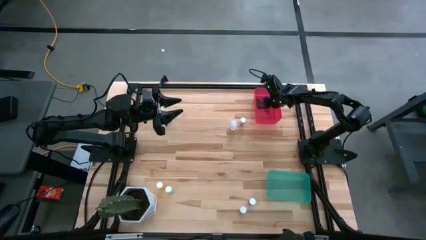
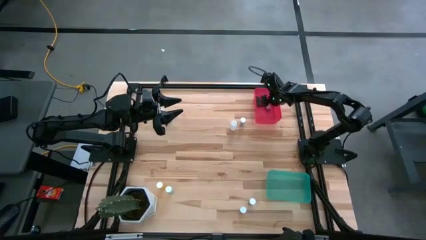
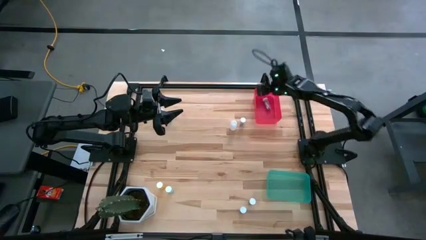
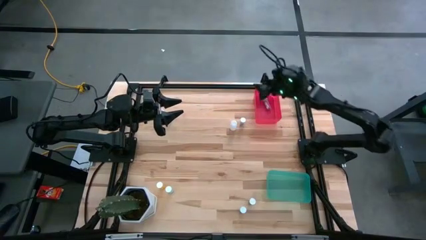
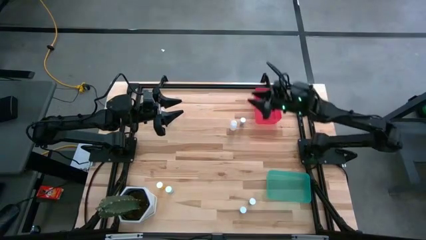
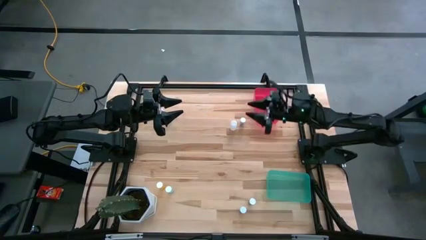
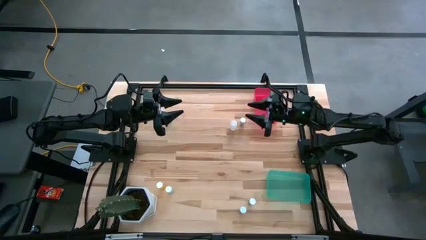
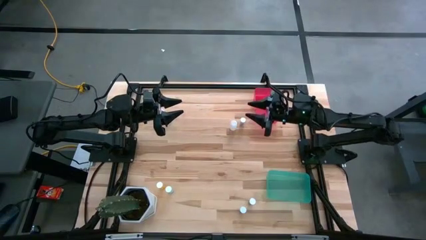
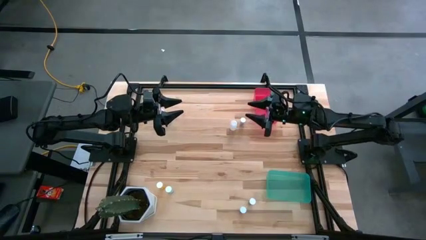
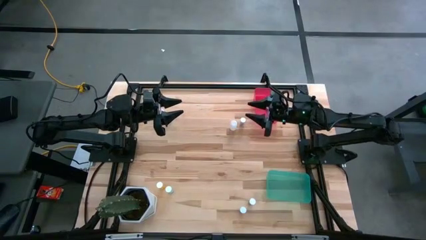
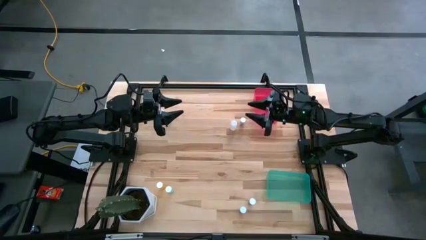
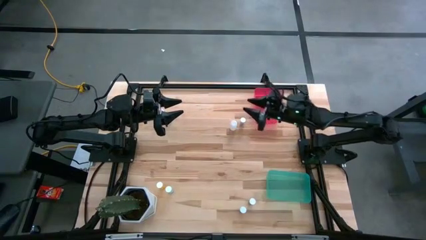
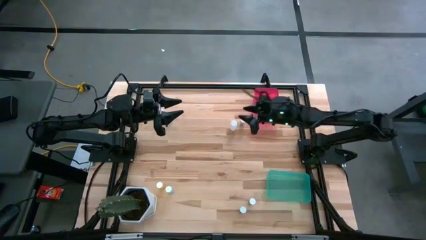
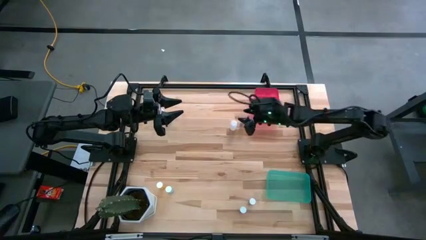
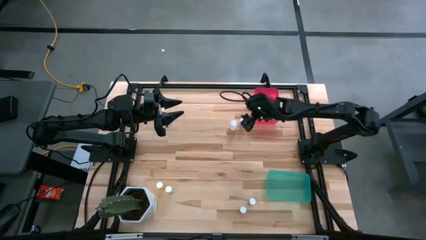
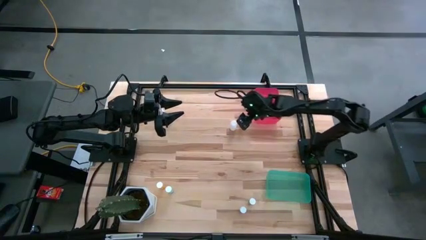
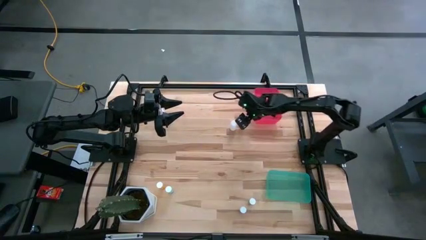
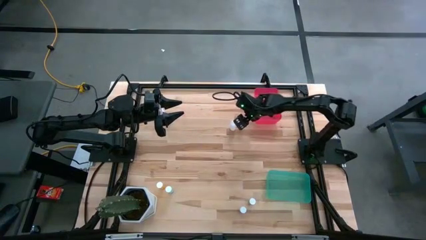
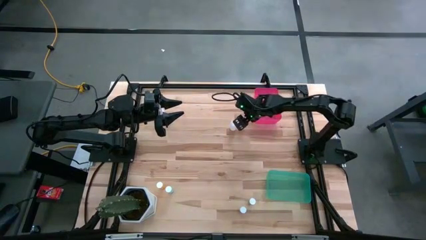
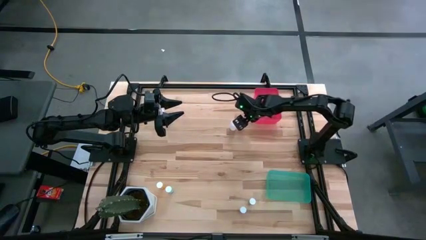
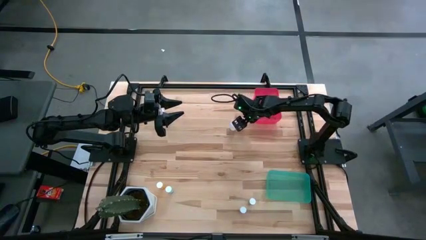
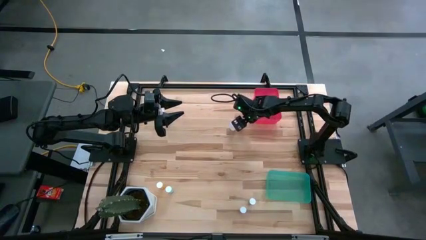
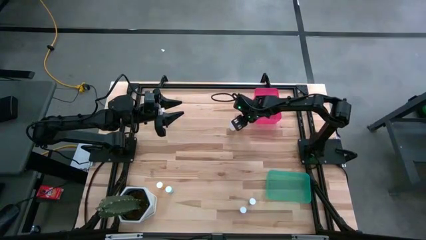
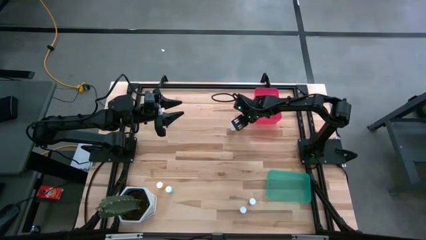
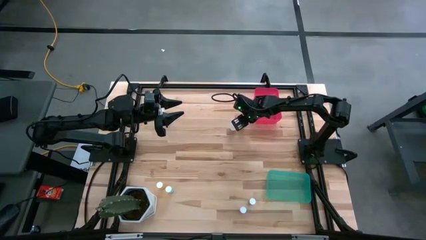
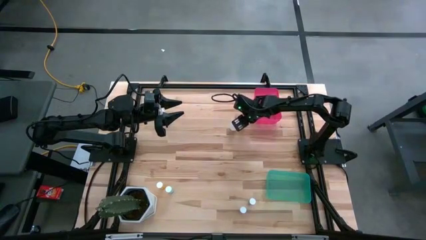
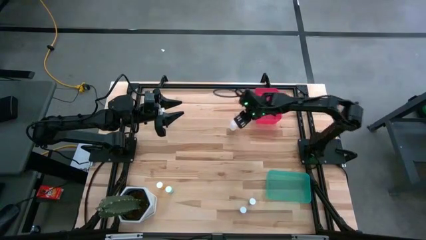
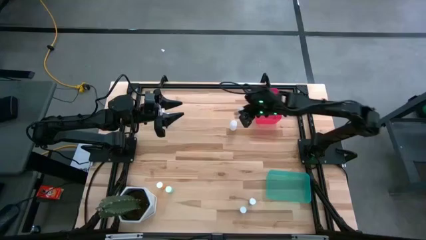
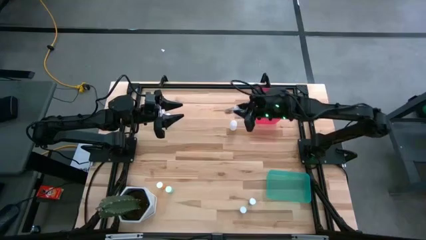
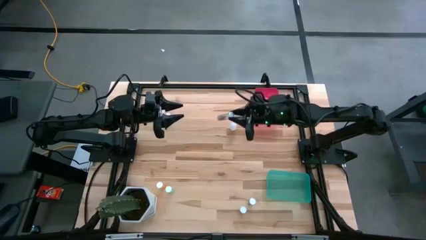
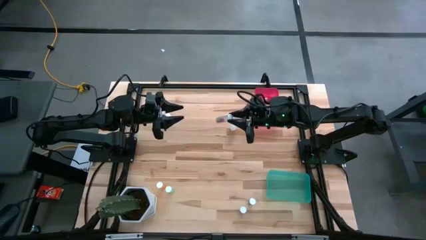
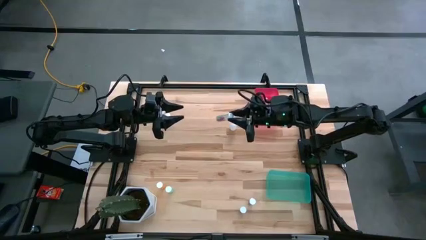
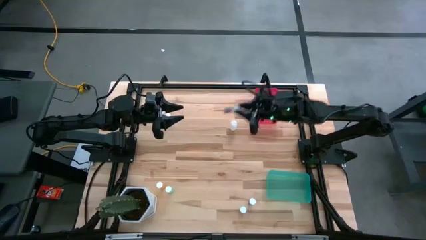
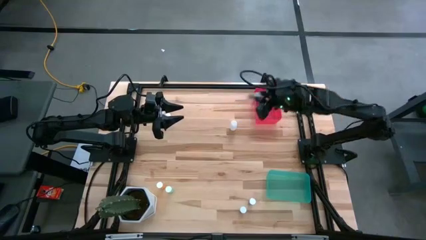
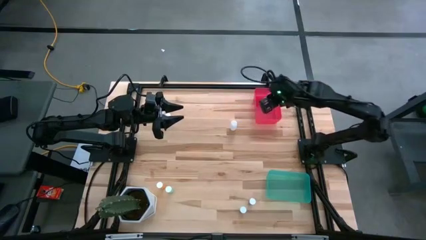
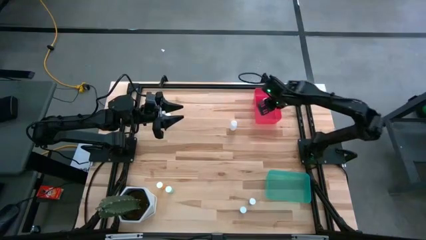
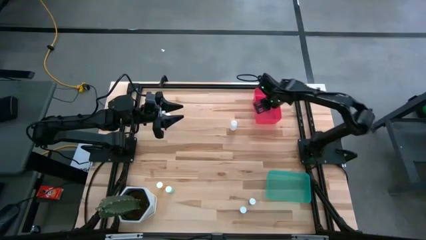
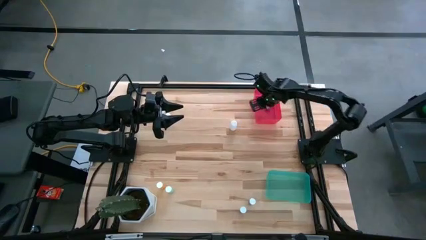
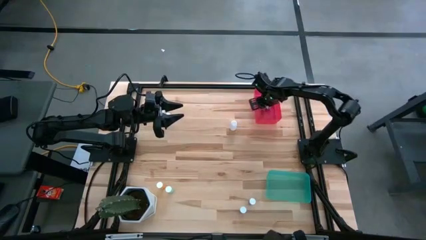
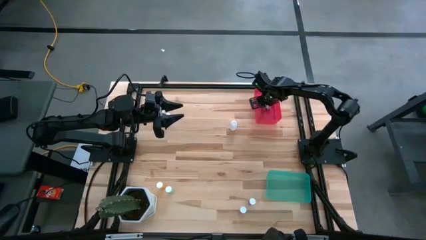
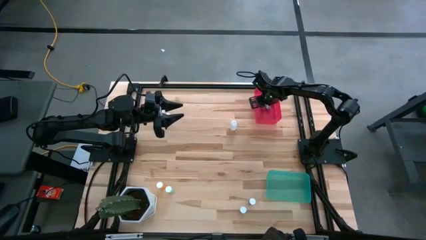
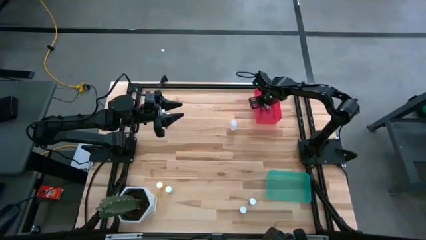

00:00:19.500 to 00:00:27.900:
Task: Pick and place medicine bottles into bin by pill shape (circle, oval)
Put the blue capsule bottle into the red bin

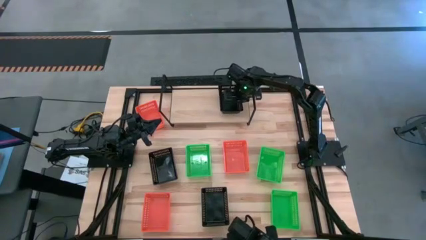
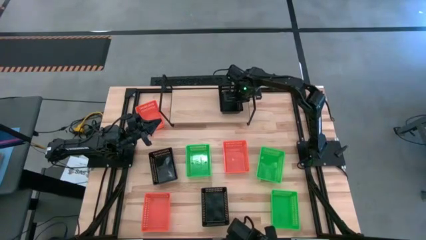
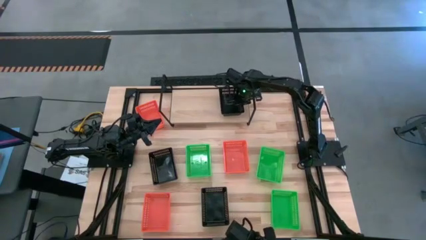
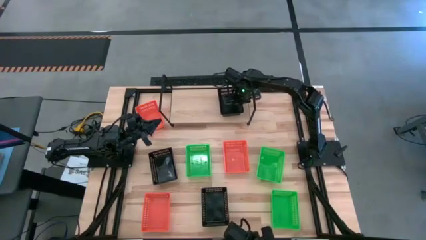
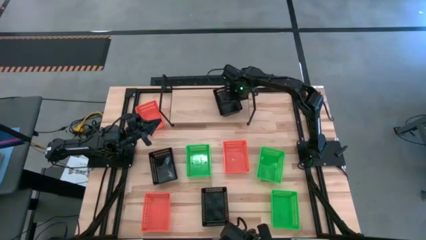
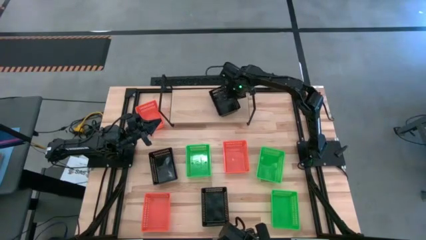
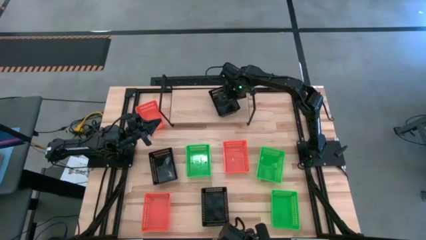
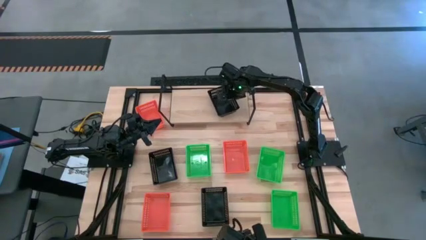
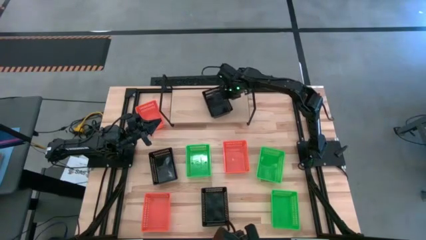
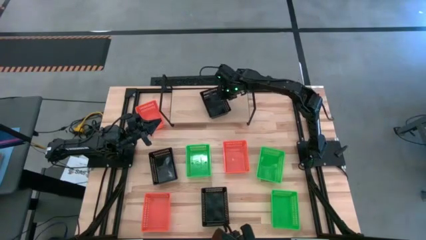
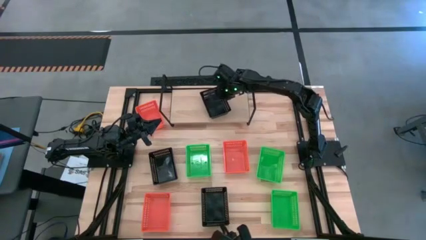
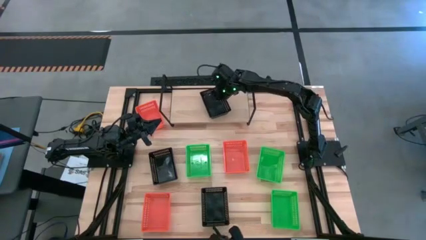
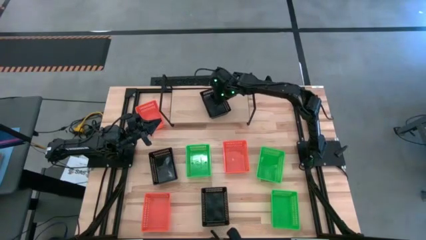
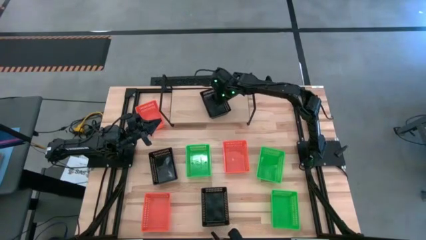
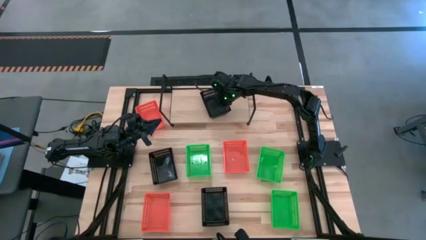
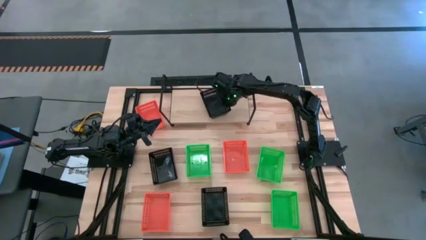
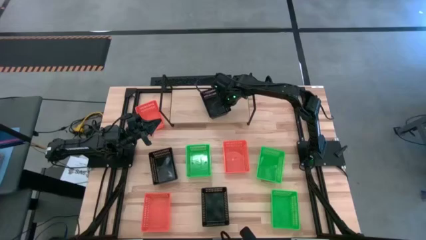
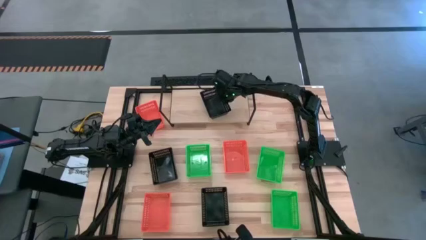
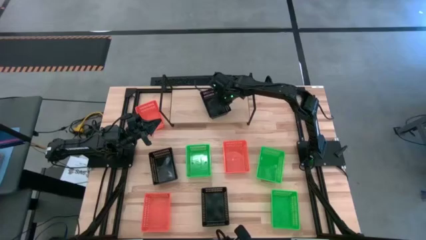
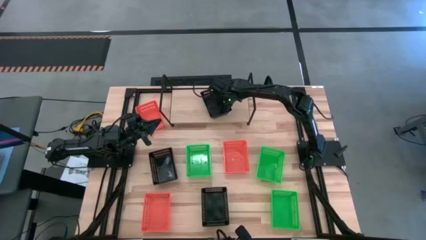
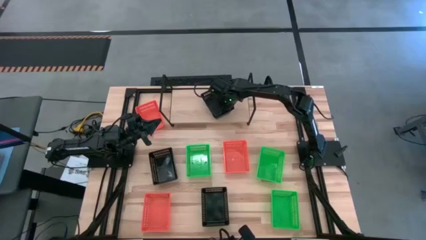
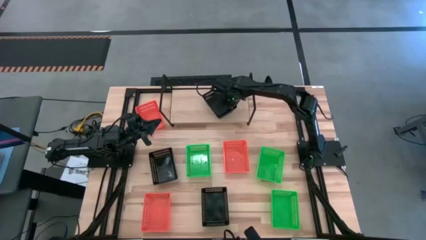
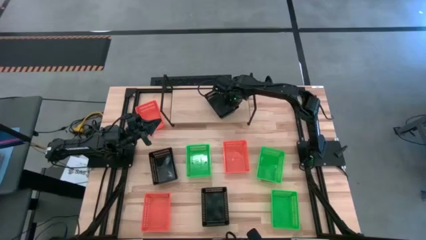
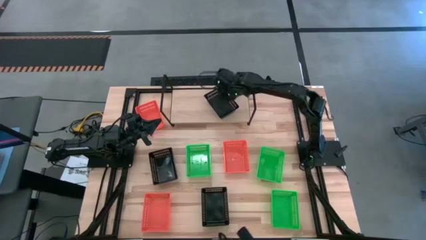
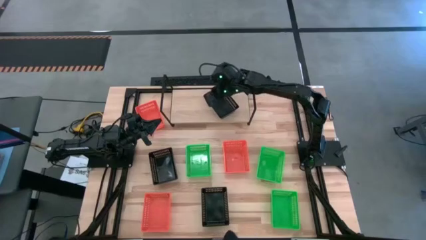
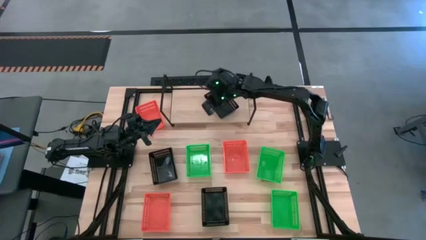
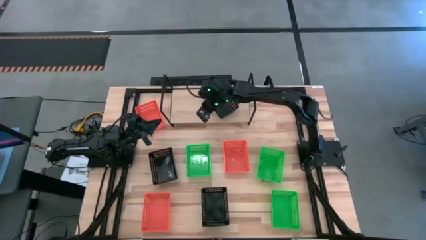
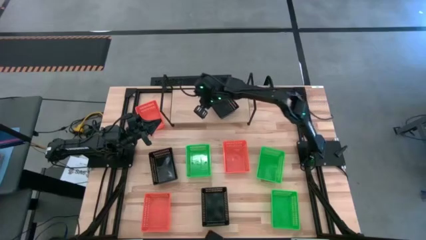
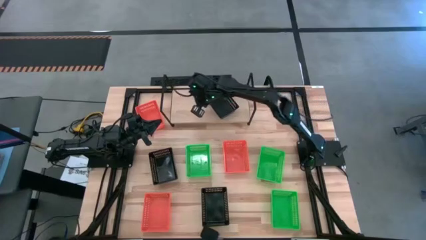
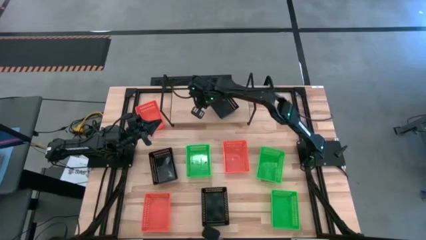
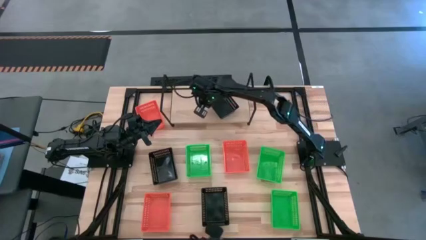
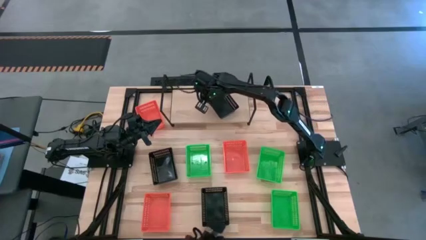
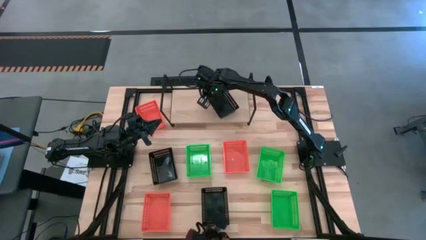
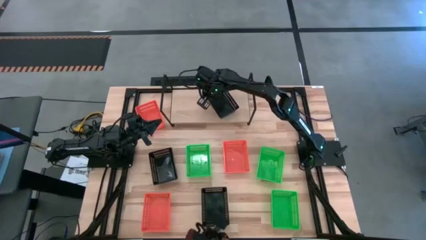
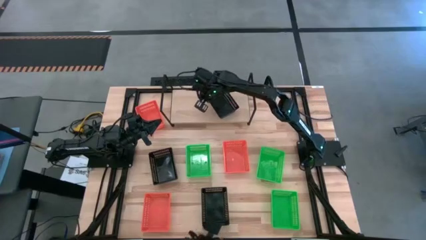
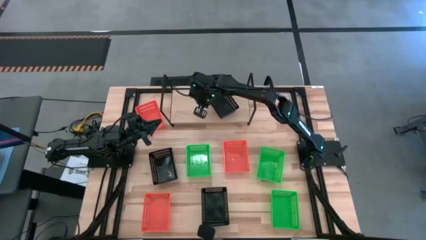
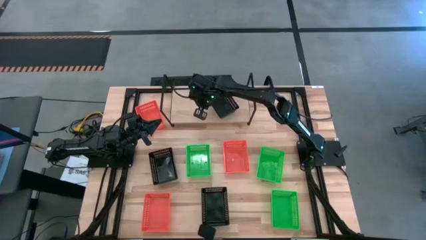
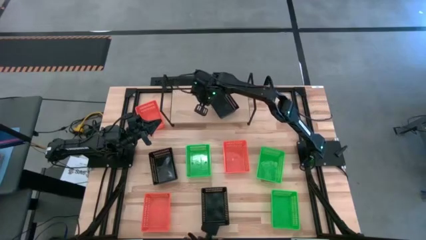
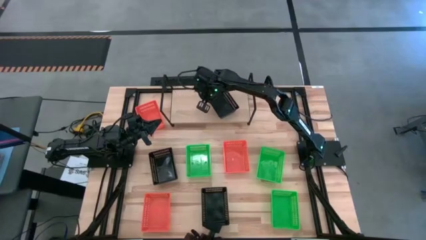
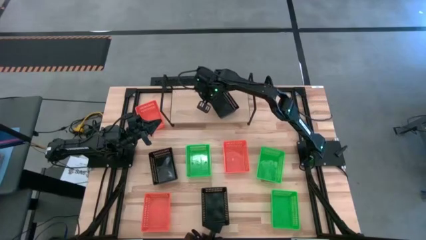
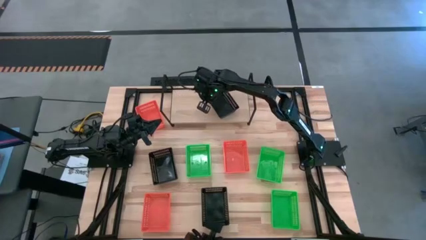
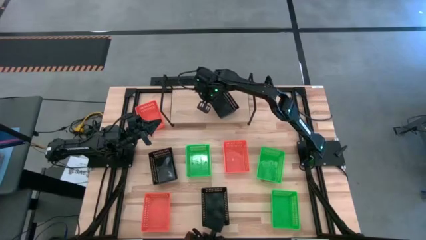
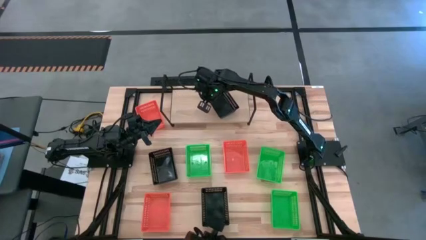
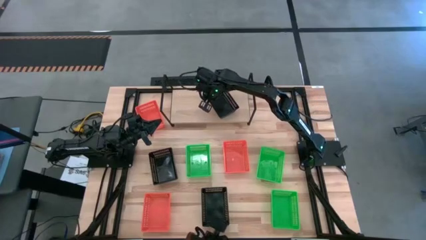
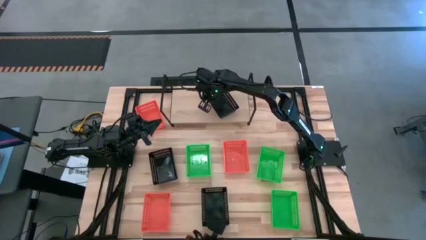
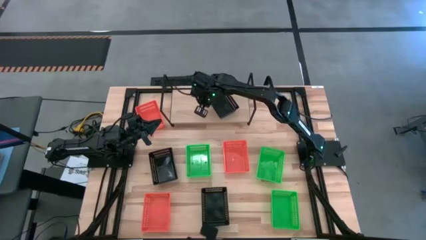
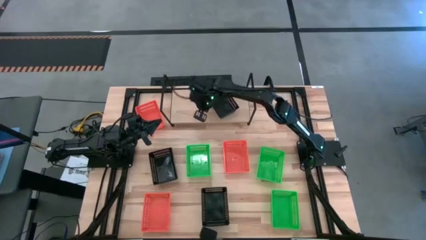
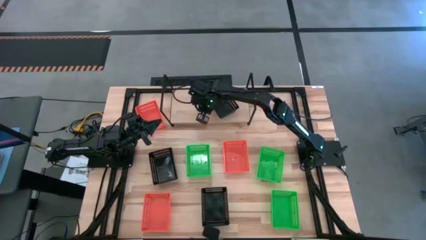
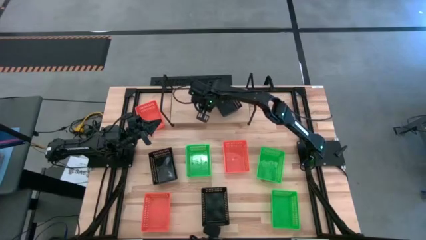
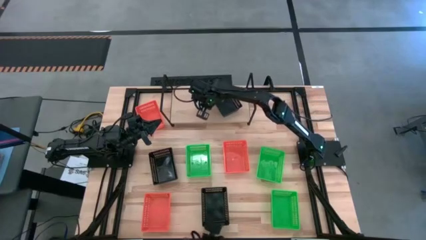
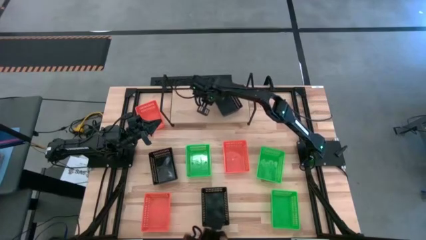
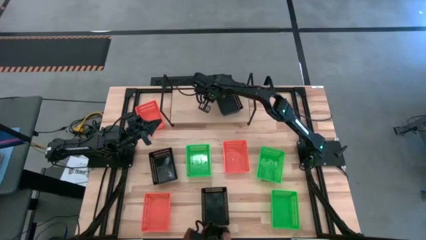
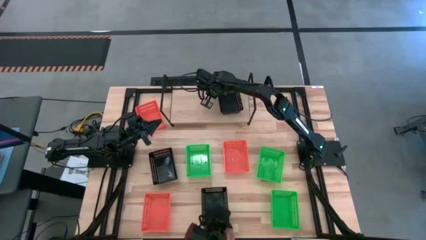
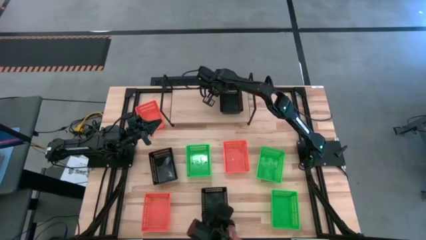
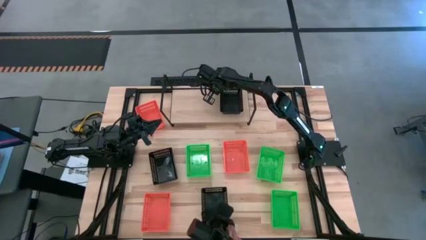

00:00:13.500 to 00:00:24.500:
Task: Stack baskets on shelf by color
Put the top black bin on the shelf
